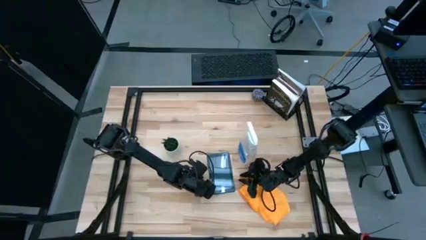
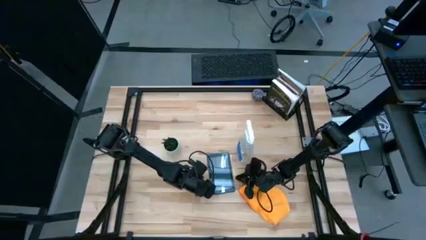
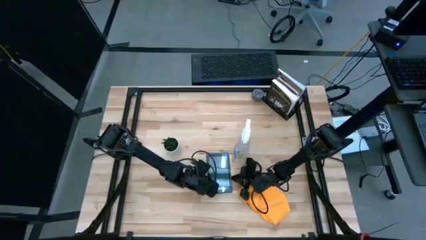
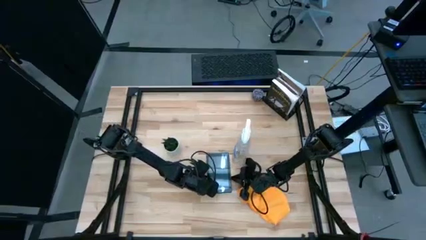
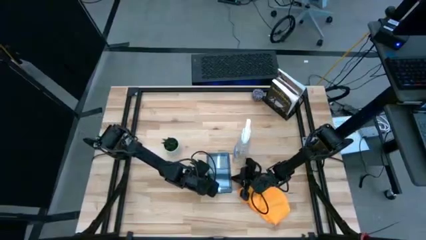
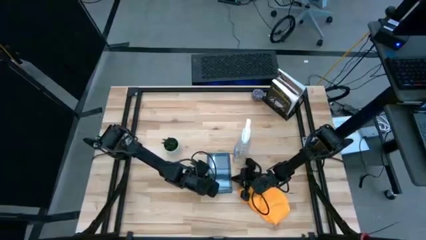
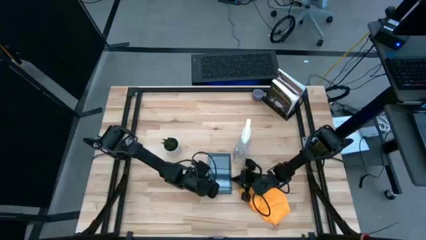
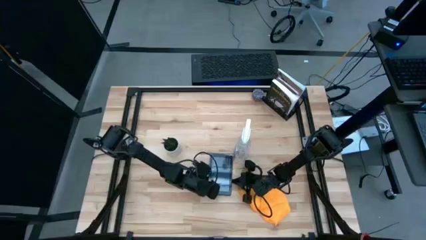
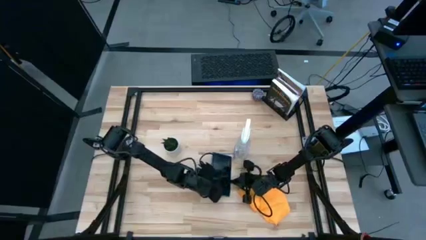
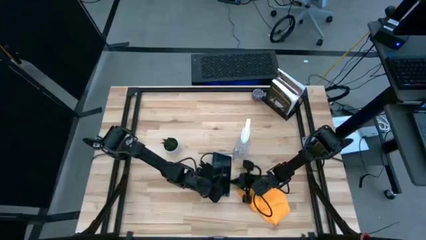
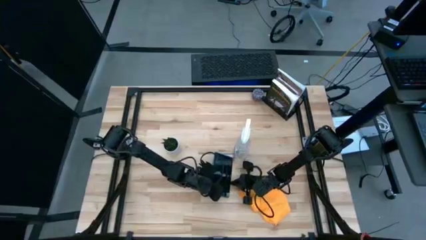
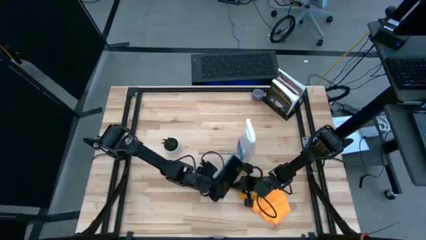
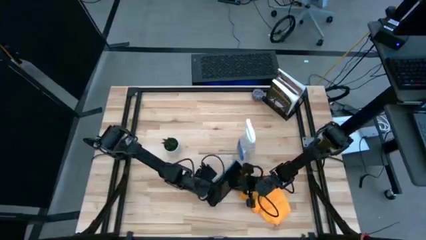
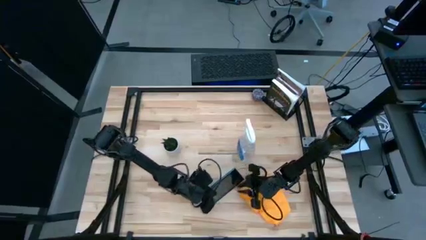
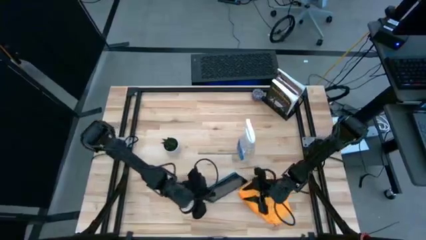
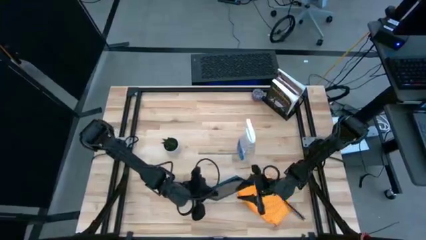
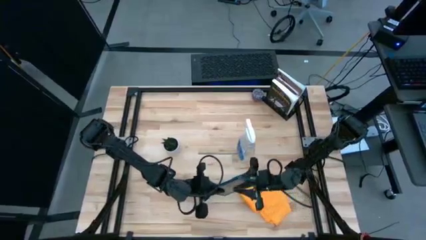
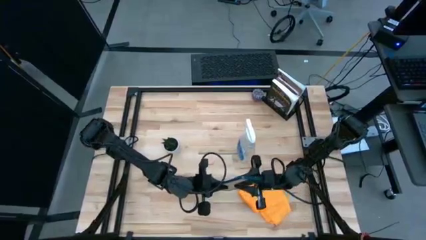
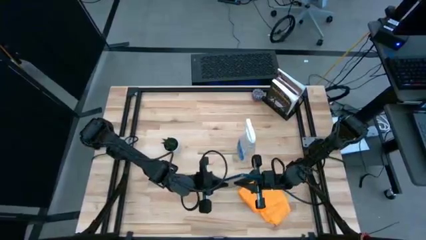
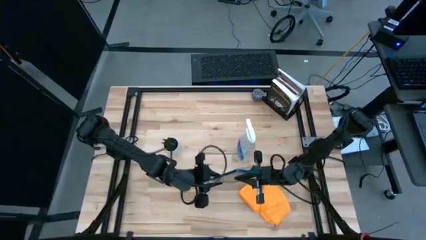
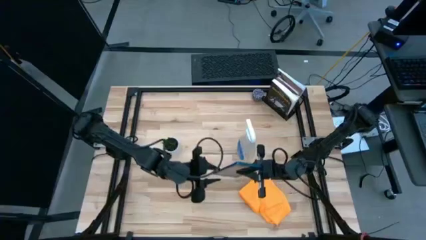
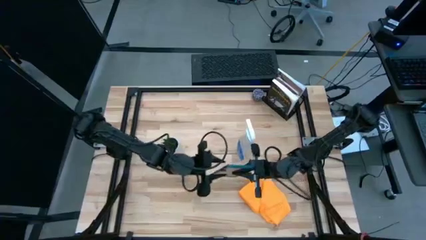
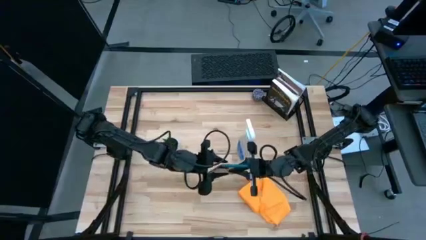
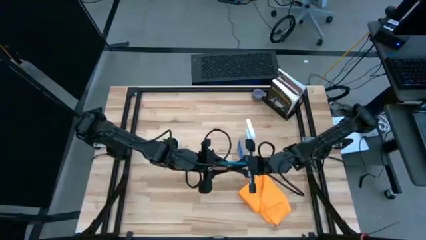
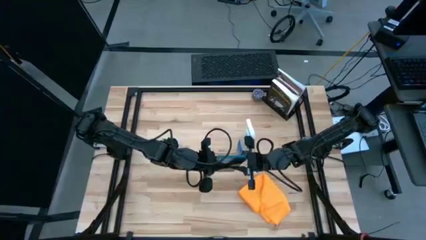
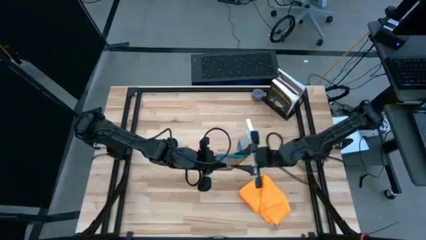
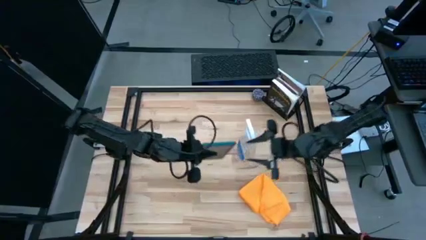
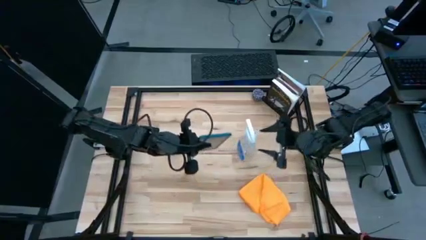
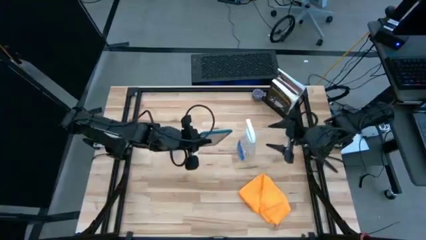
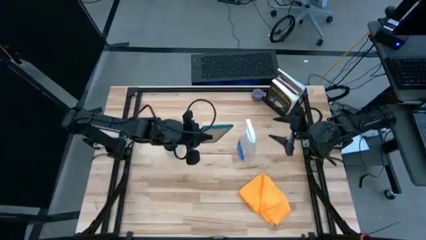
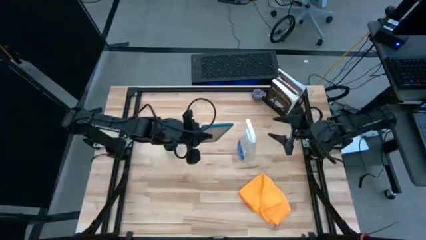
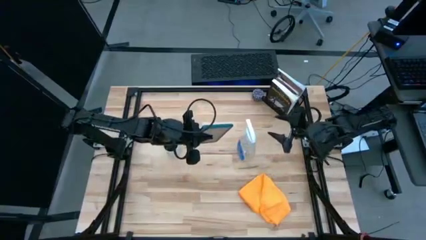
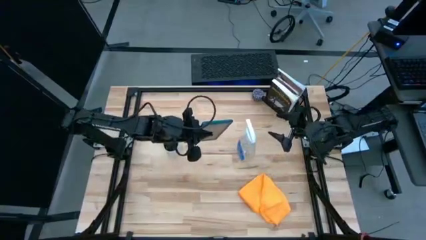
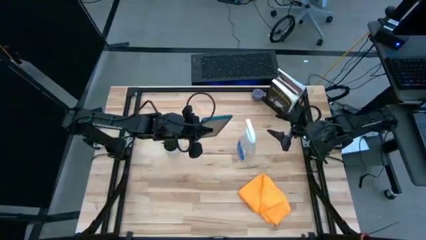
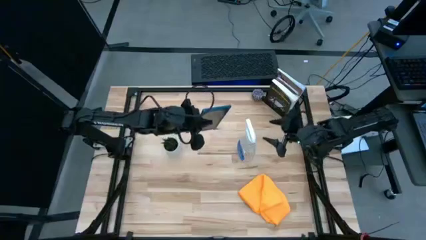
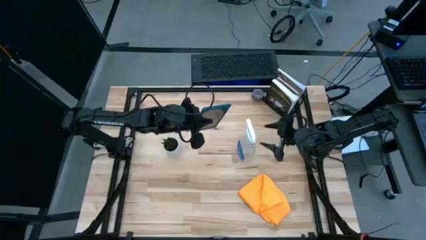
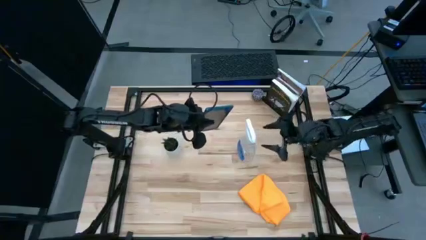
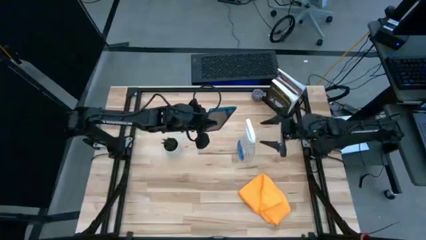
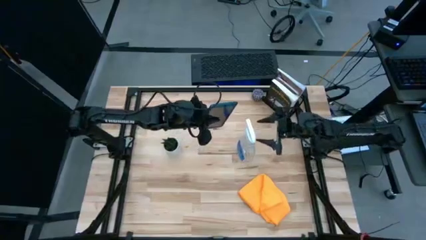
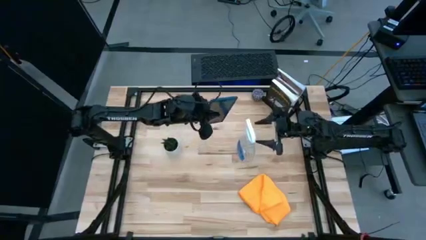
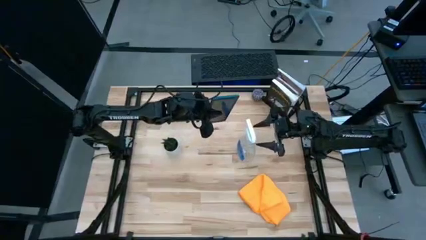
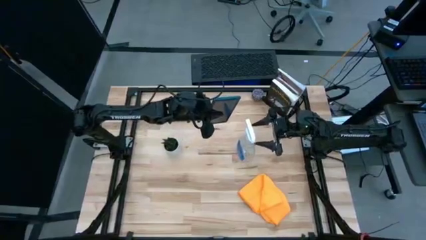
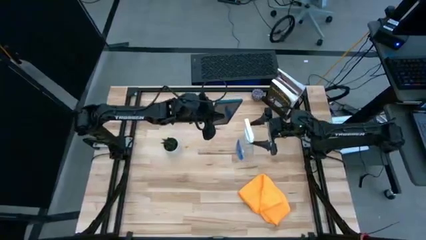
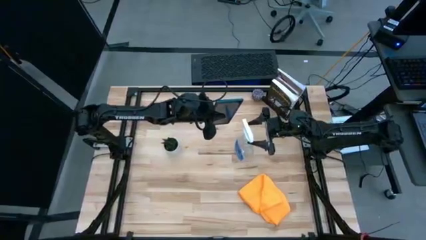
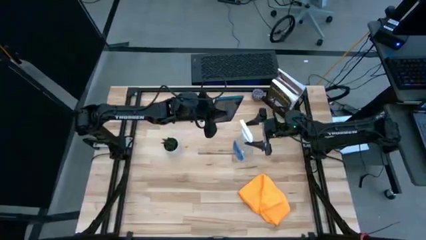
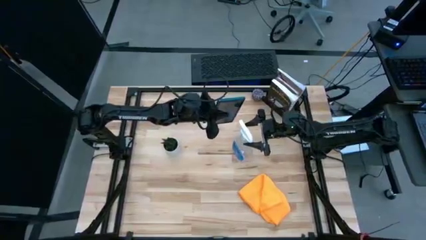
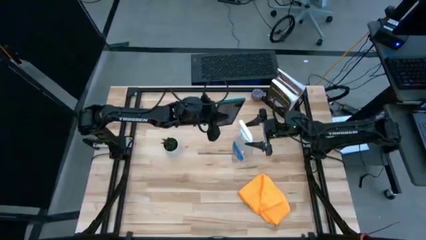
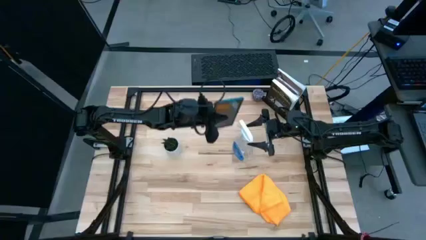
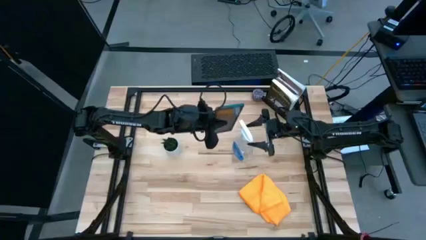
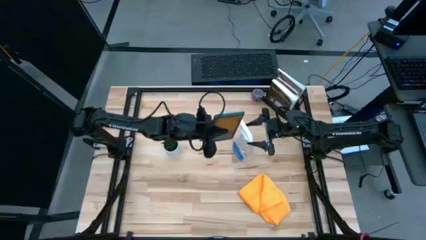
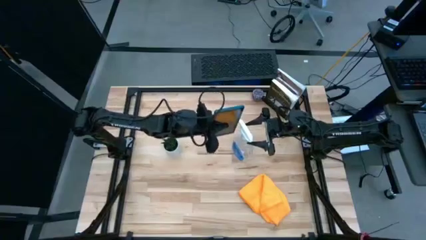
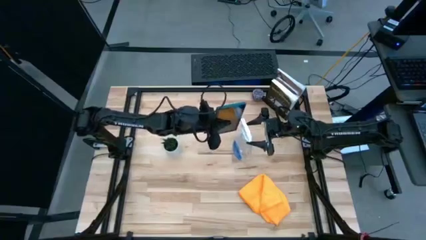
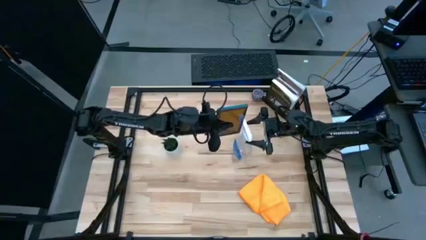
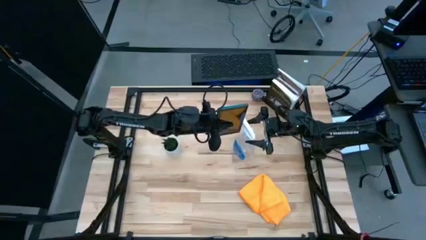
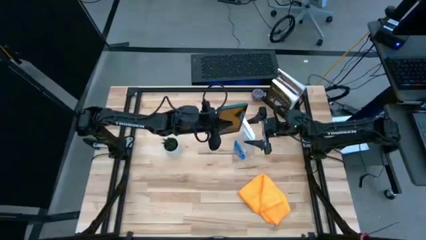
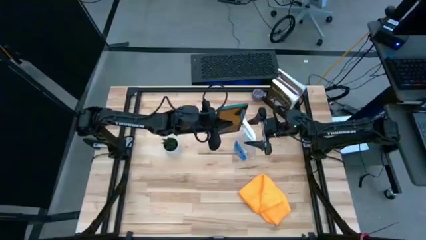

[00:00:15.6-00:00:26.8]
Task: Apply microfiber cloth
Spray the front tablet using the spray bottle

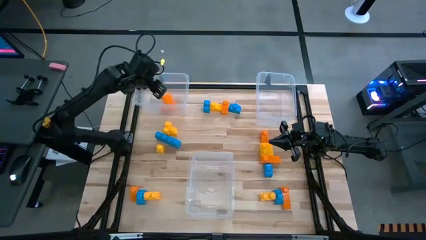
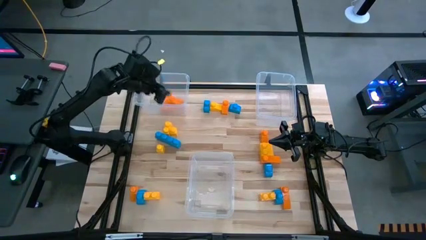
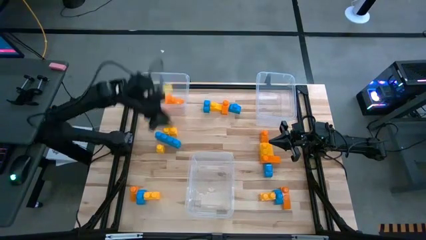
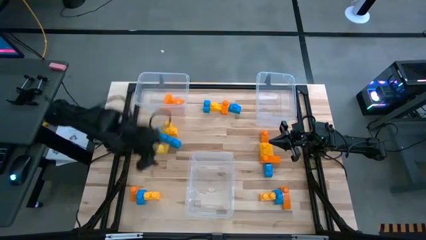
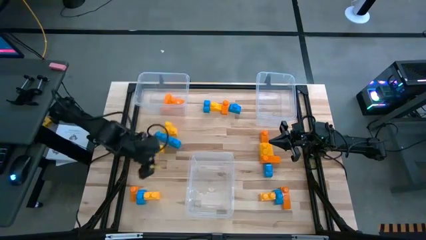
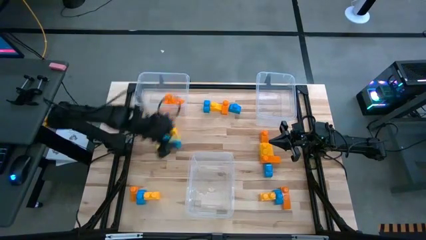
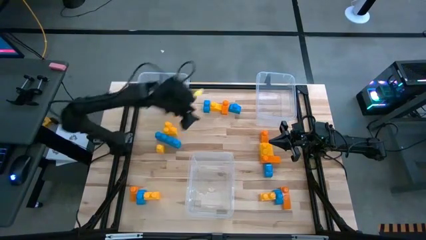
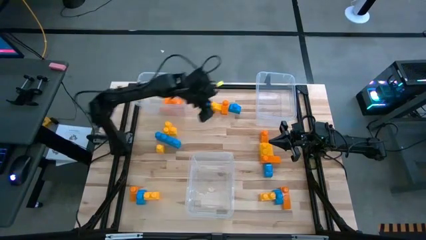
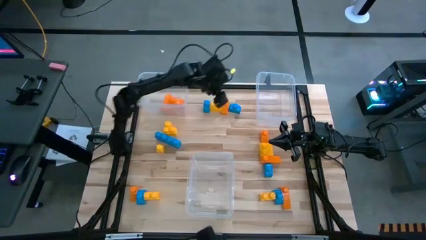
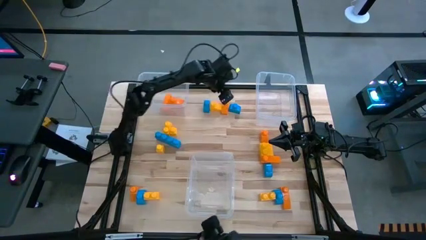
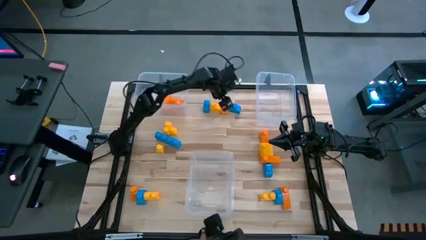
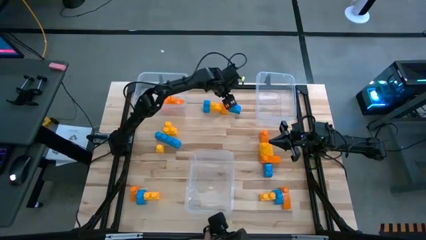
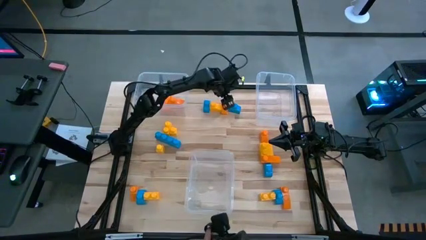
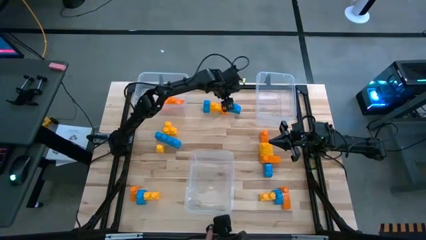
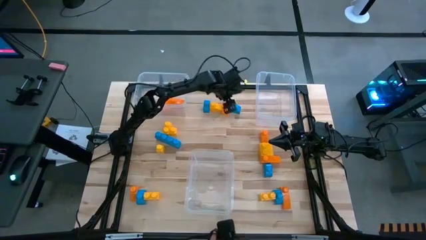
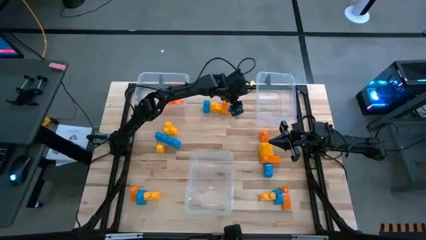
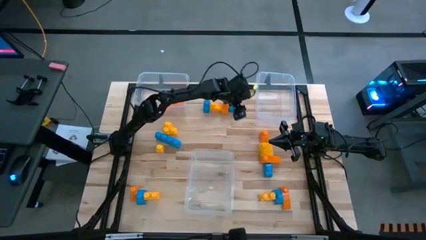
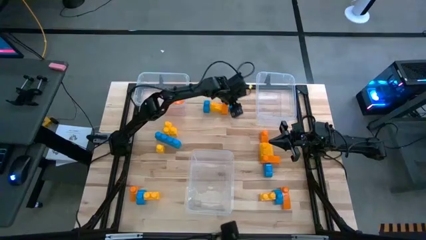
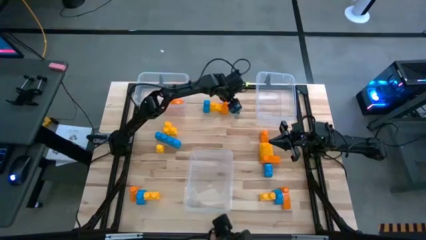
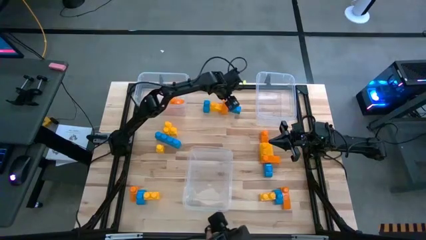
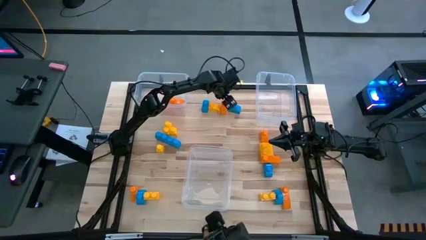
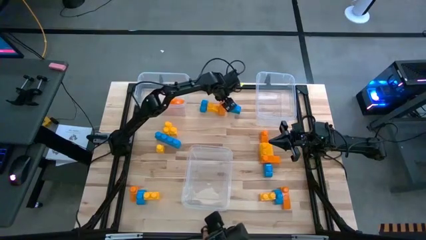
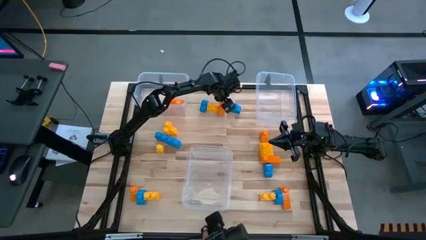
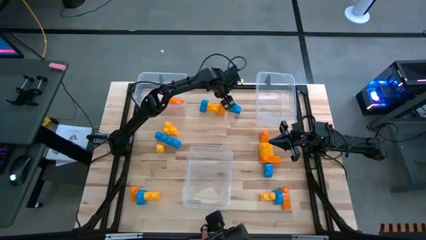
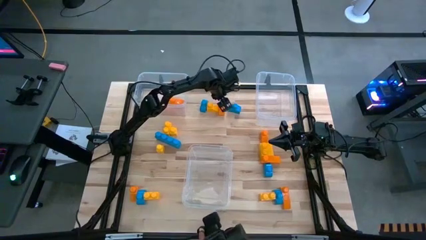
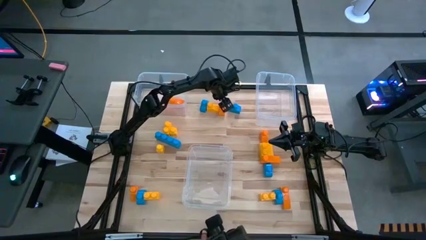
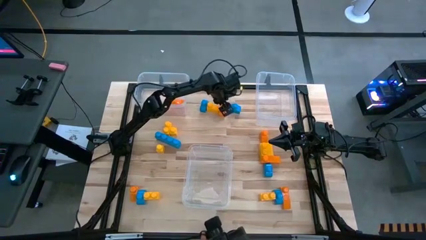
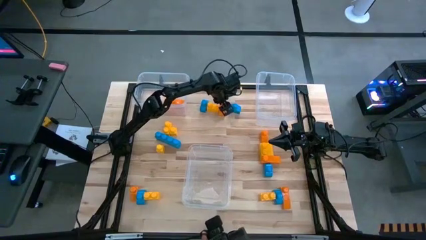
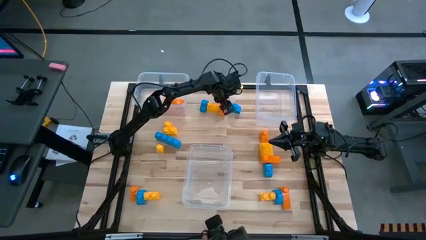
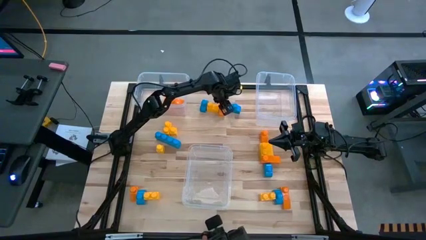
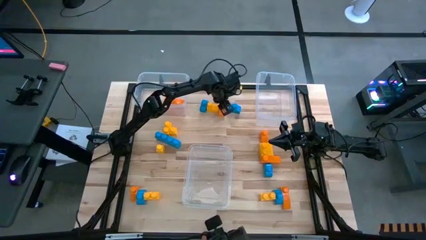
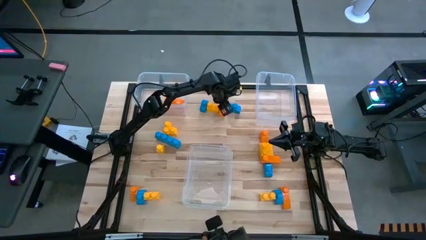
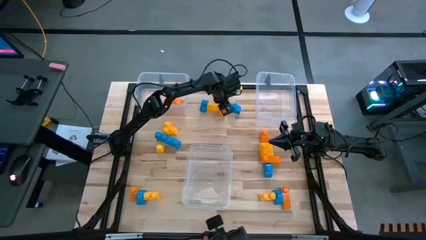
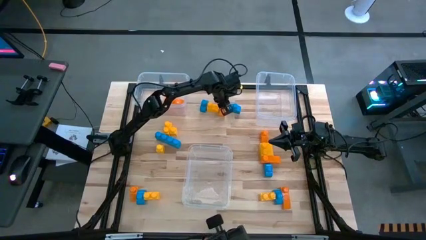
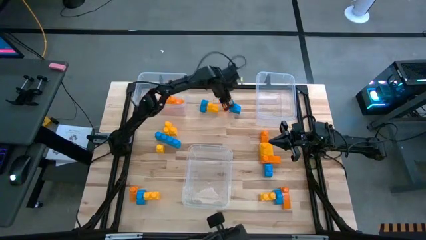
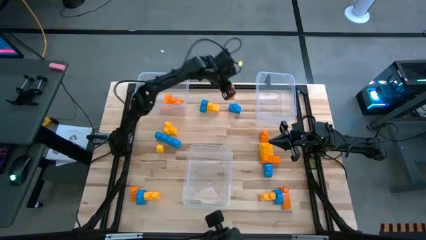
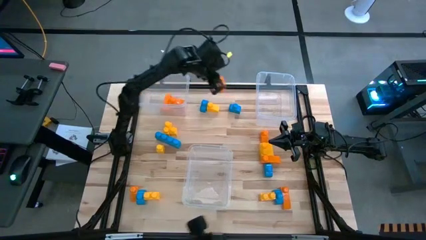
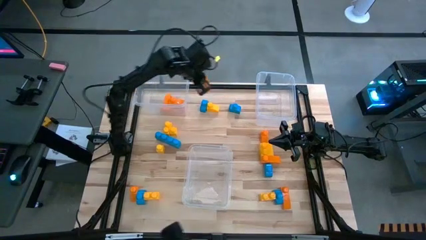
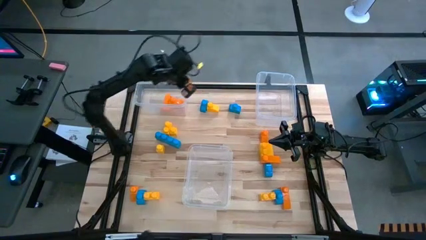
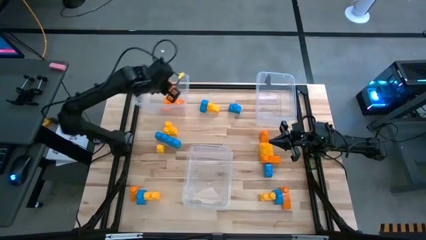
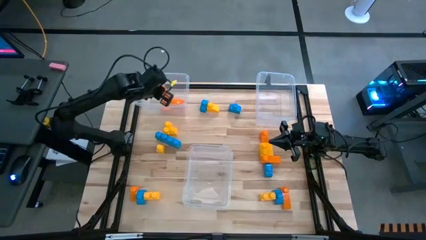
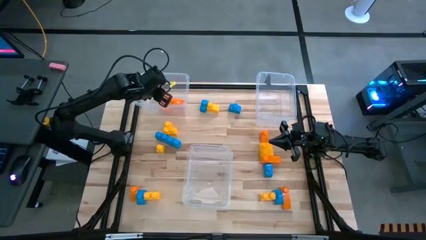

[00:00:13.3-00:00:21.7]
Task: Sort blocks
Put the orange game piece into the top left transparent bin
